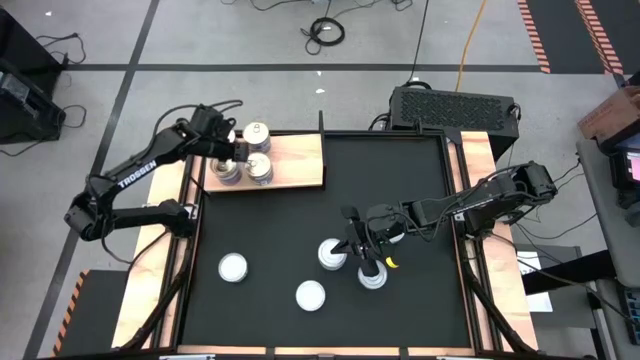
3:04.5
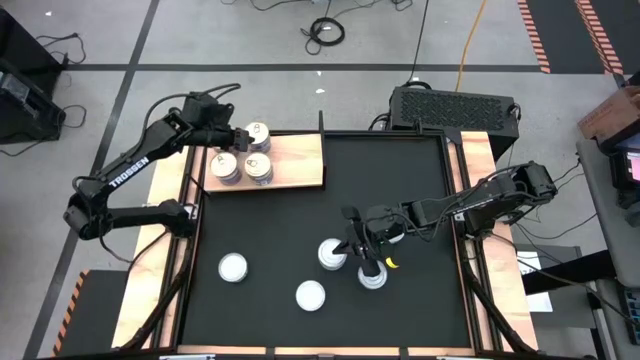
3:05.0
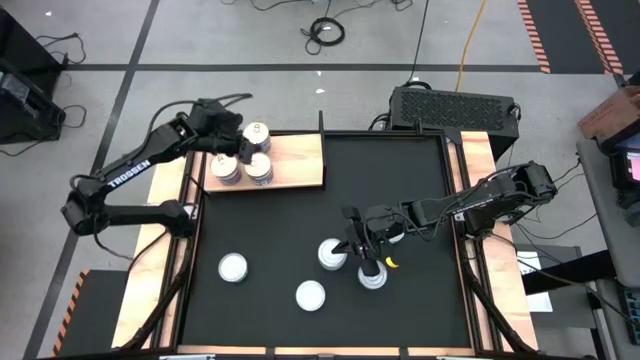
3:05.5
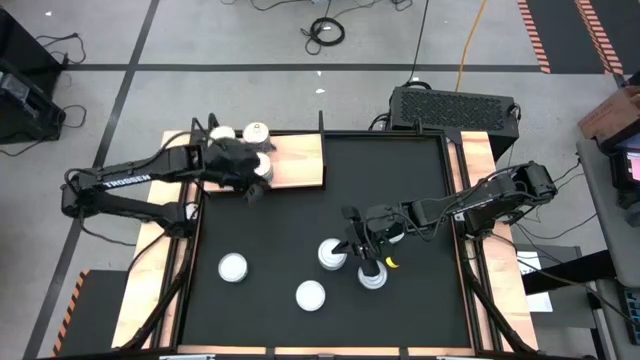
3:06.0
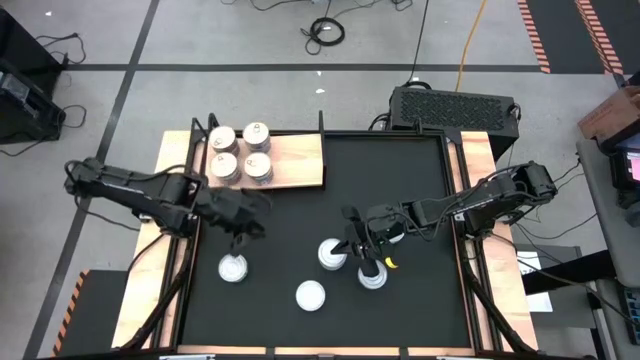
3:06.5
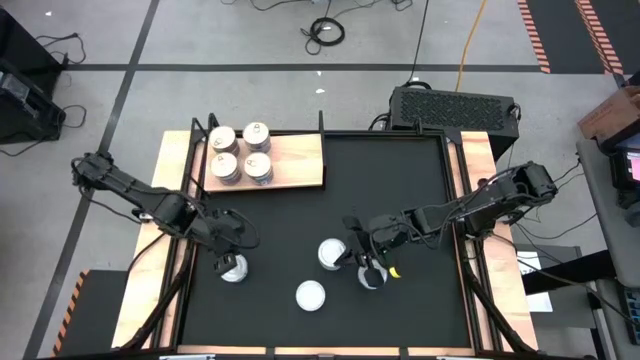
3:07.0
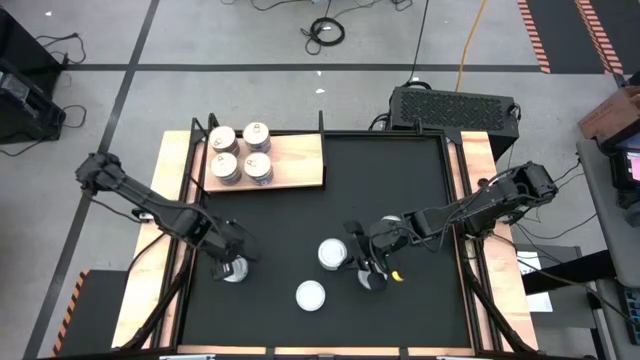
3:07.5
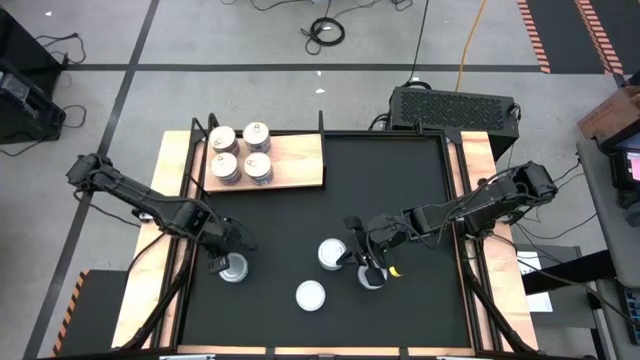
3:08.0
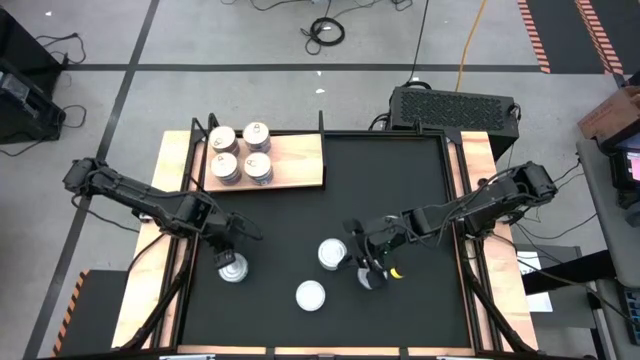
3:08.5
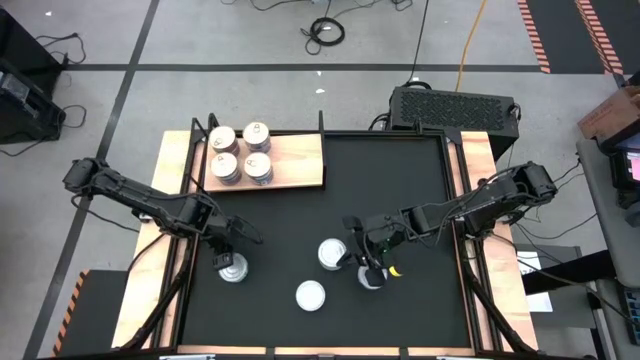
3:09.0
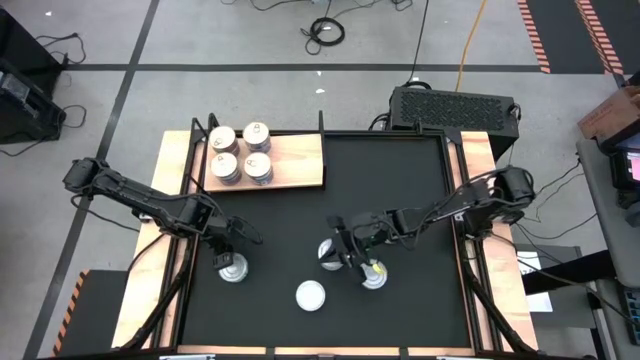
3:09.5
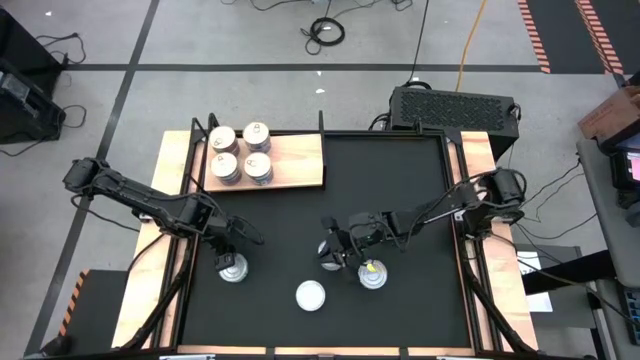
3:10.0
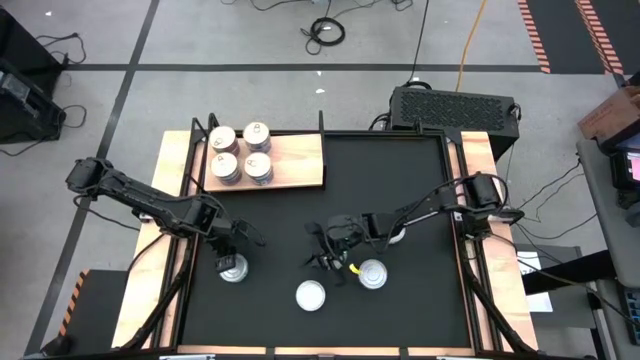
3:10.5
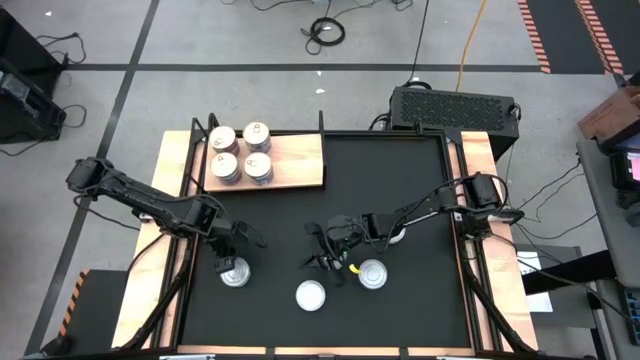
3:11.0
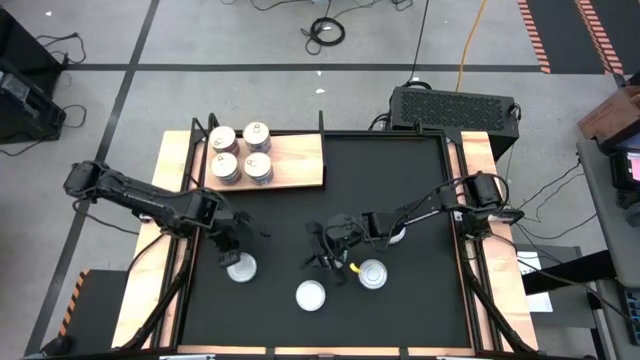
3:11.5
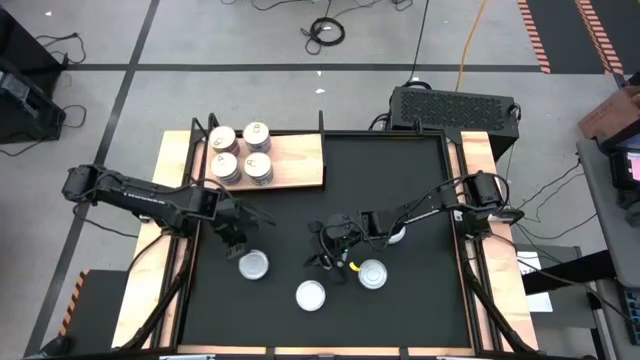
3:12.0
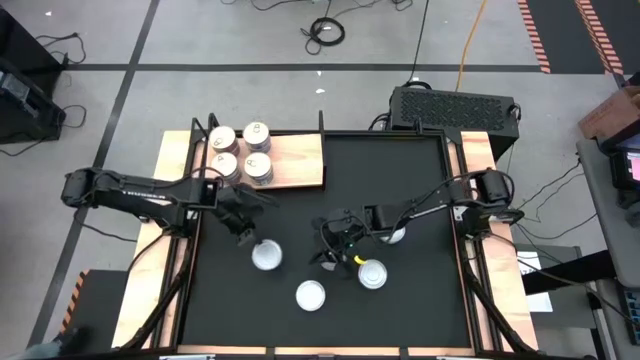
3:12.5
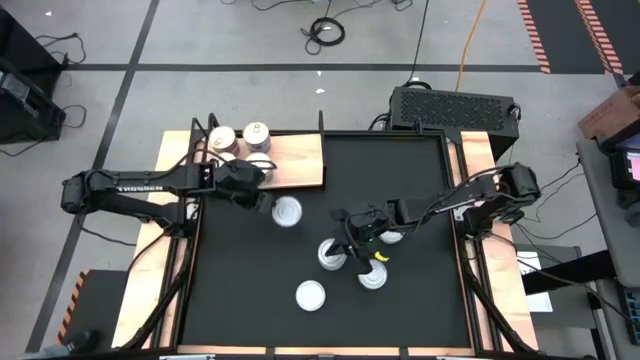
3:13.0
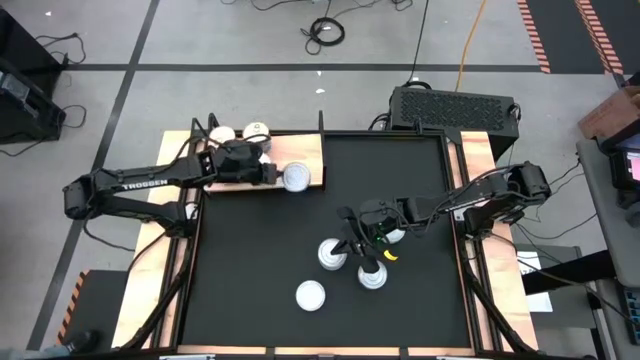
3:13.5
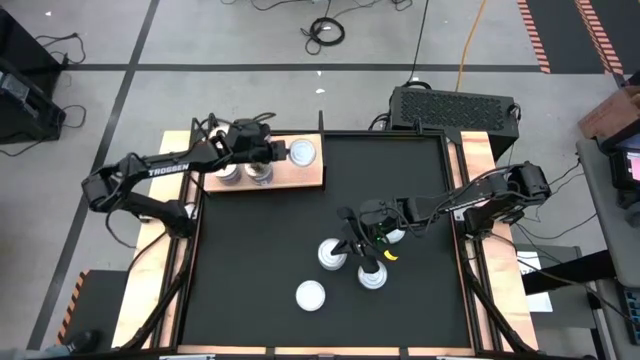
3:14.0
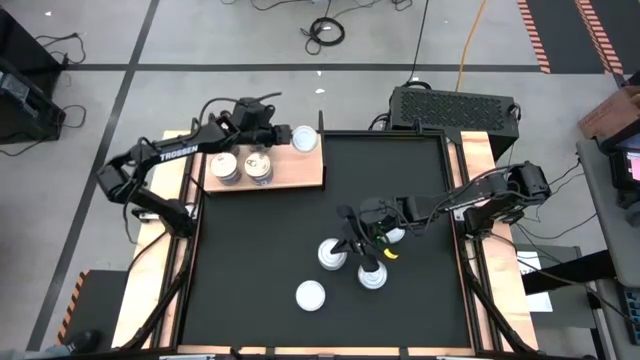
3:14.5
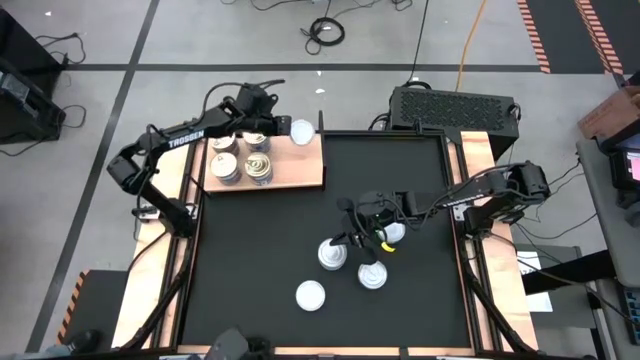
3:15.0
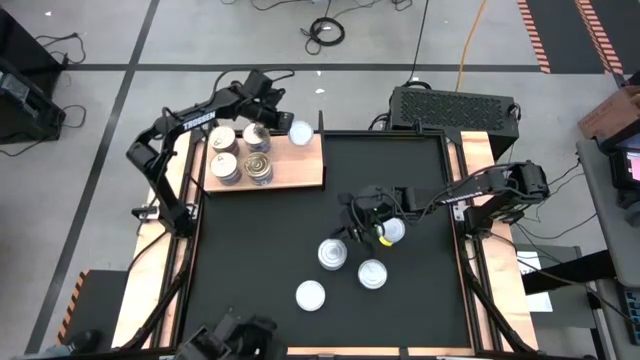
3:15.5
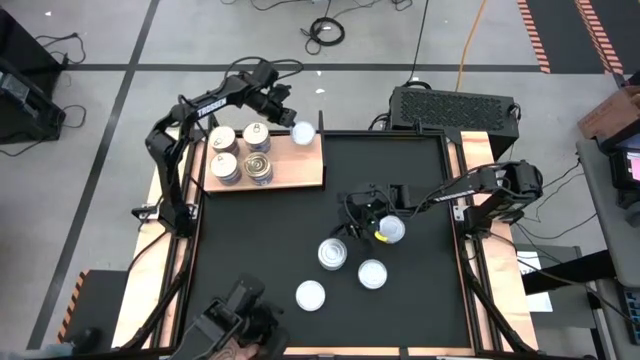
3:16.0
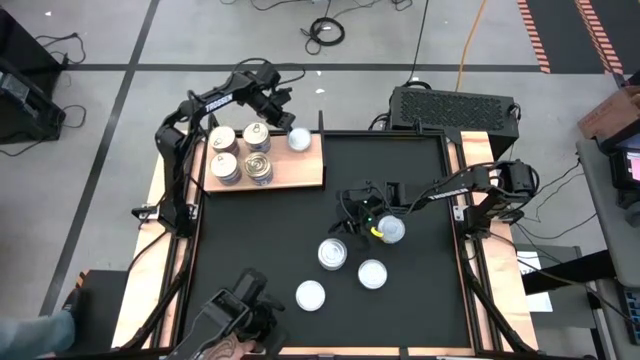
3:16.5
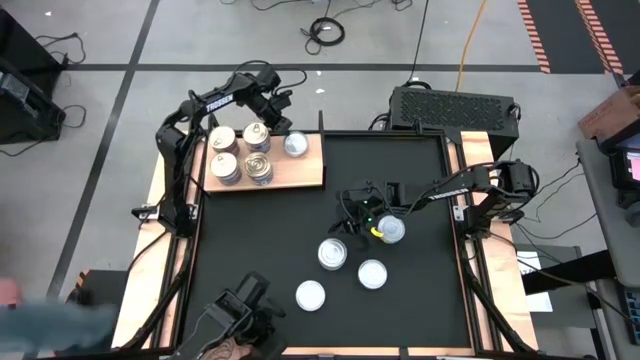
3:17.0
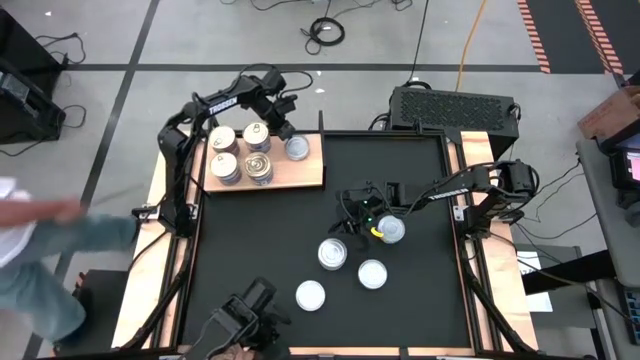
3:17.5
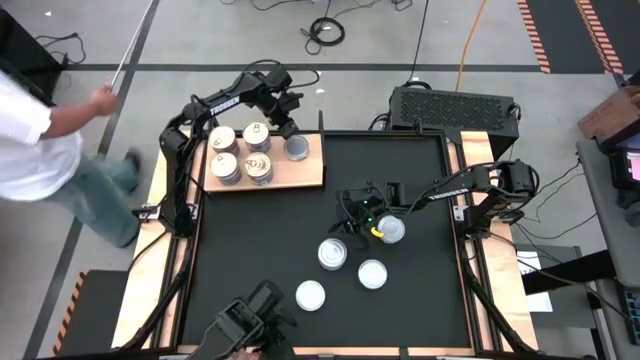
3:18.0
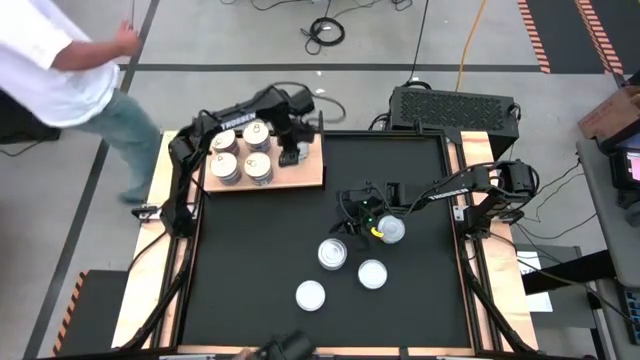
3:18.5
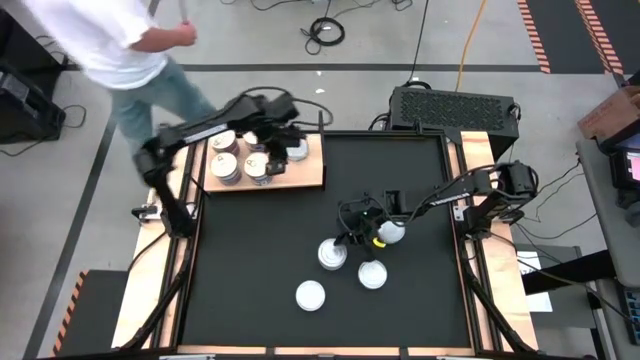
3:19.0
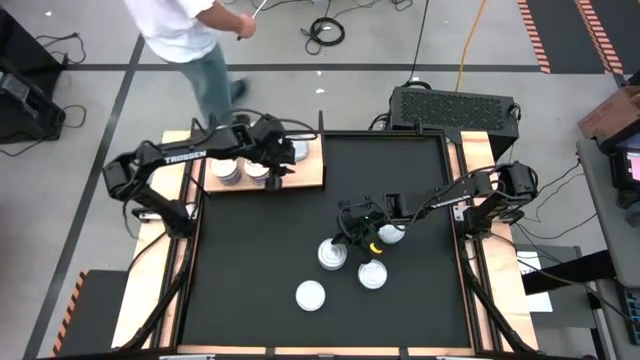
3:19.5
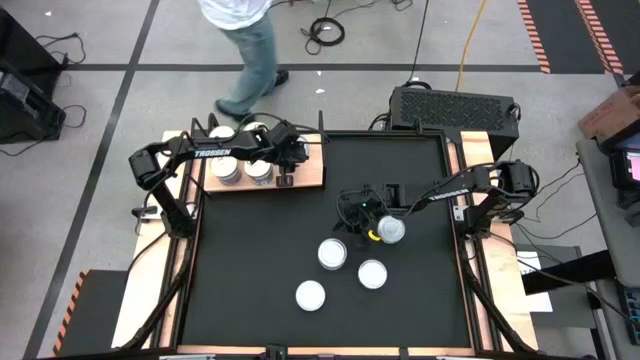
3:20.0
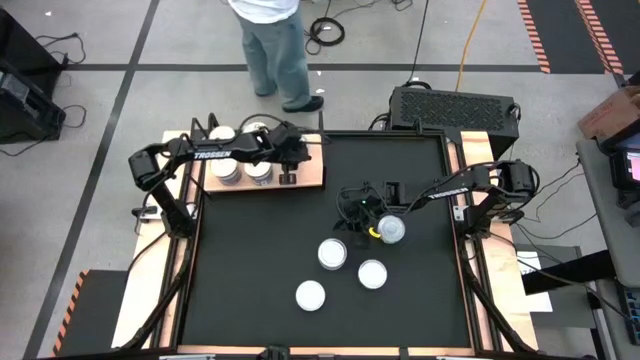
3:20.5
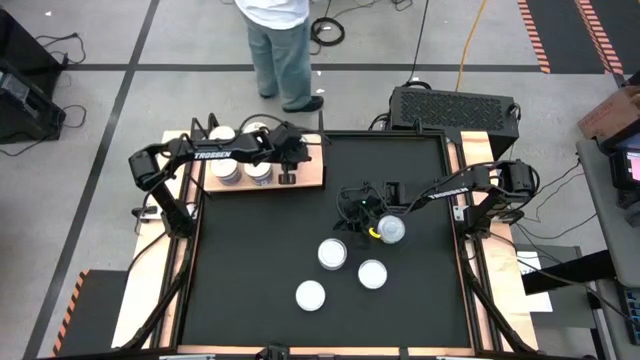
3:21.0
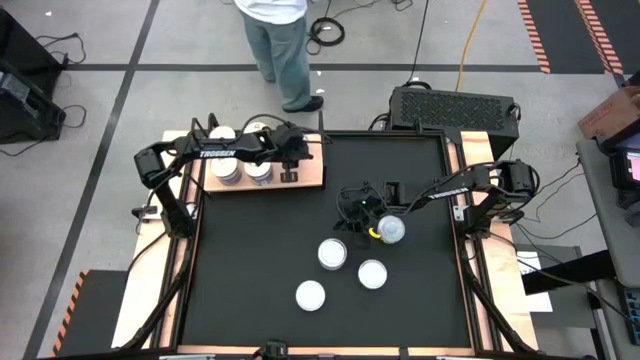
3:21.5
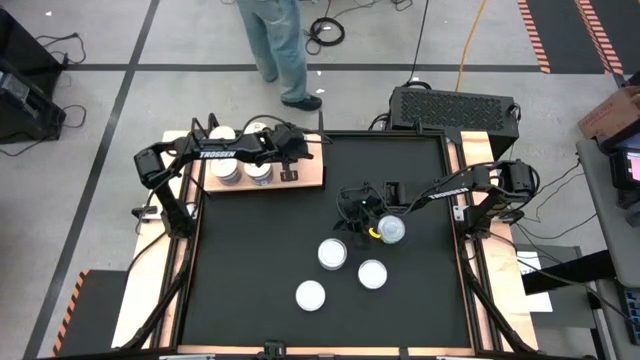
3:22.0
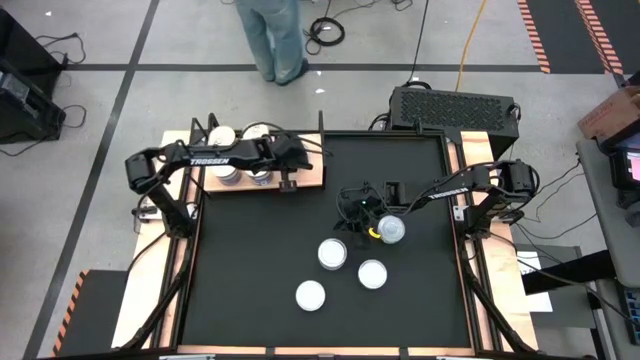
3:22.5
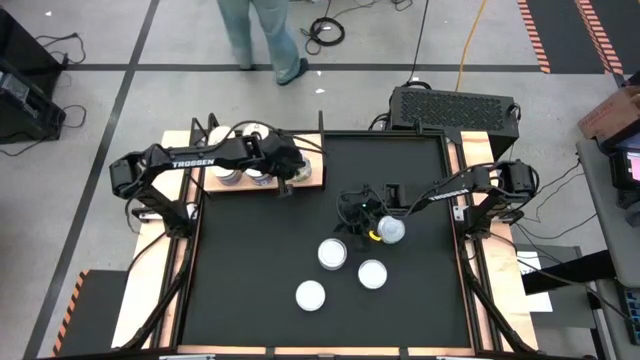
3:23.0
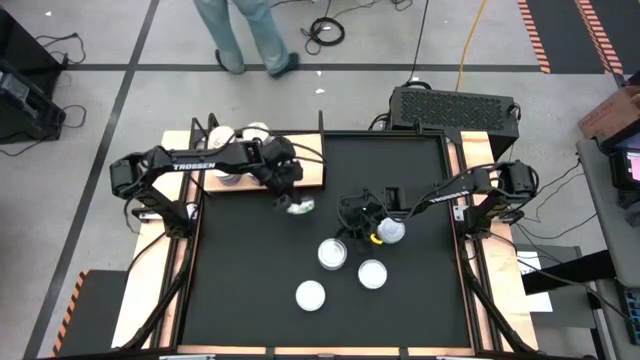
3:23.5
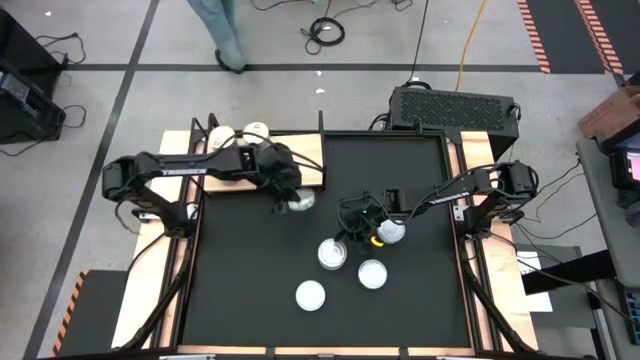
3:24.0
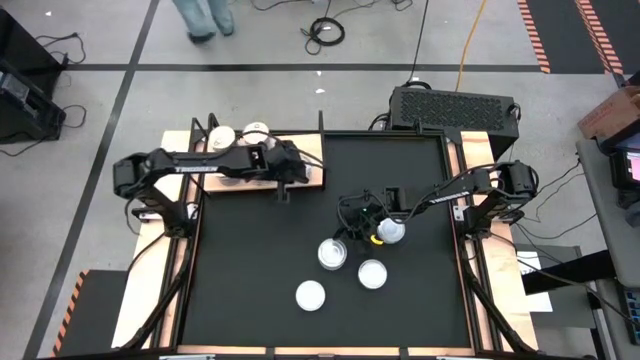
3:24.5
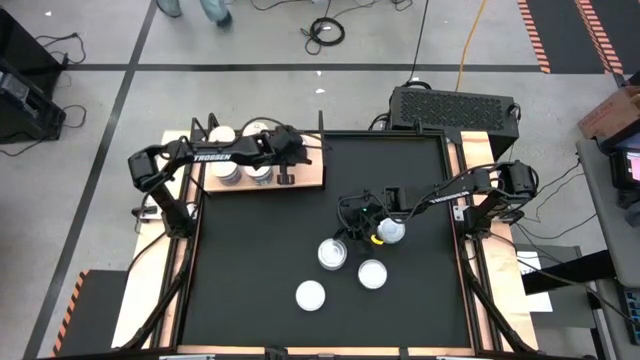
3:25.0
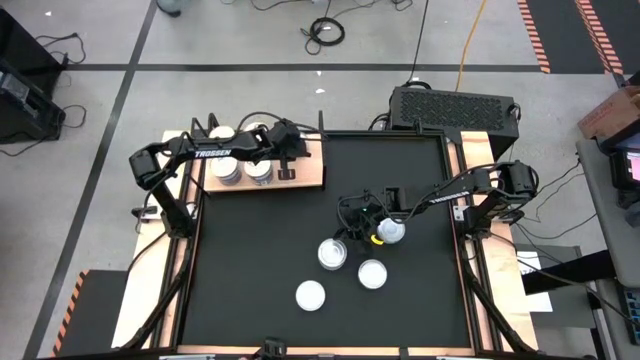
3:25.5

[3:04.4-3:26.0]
Task: Stack canned seafood by type on shelf
Put the green tuna can on the shelf

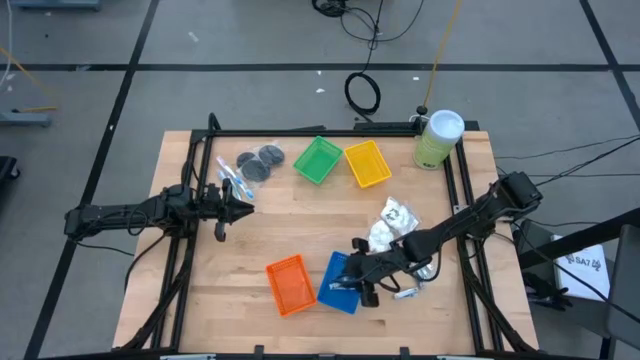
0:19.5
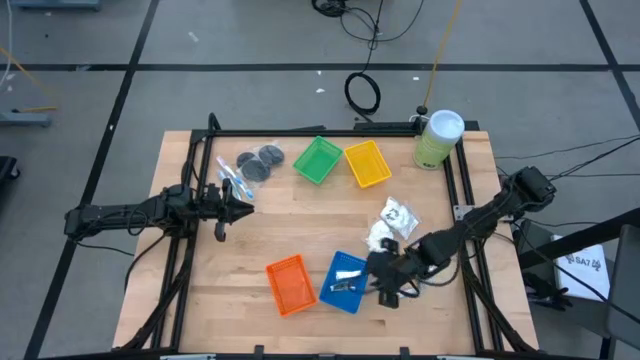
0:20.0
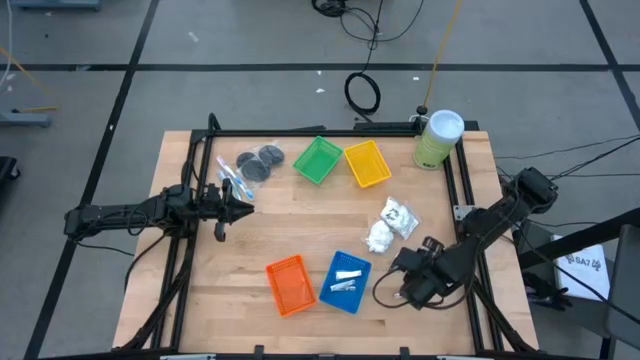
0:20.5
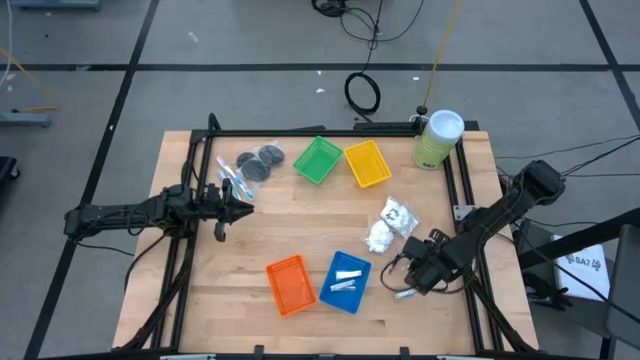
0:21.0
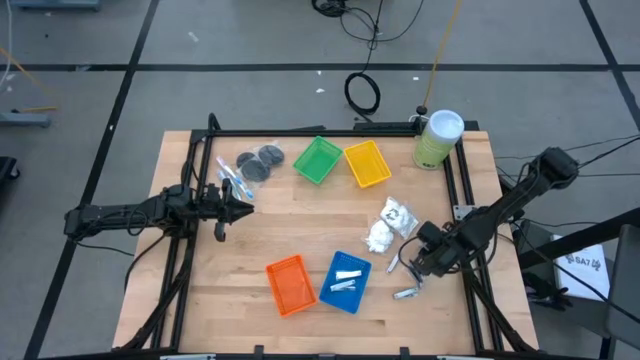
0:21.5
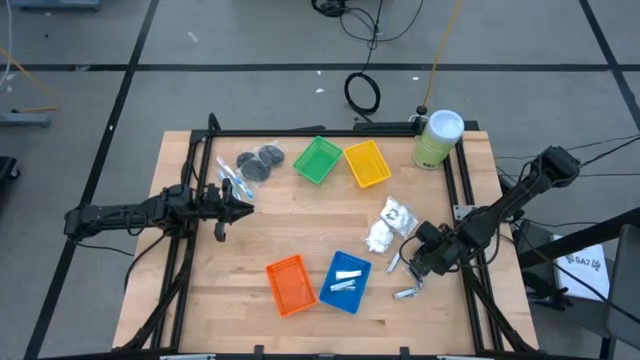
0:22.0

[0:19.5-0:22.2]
Task: Pick & Place Travel size toiletries
Put the silver nail cutter into the blue bin
